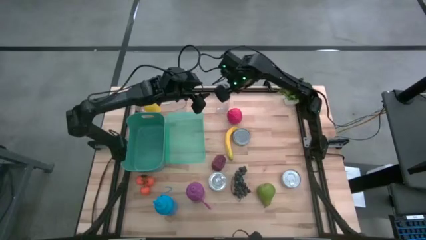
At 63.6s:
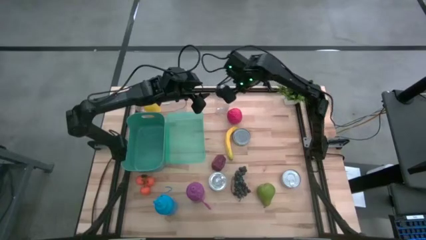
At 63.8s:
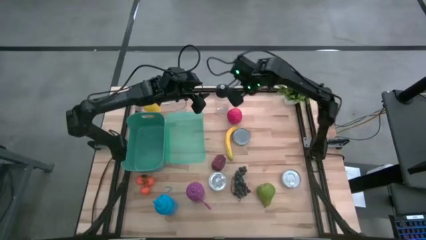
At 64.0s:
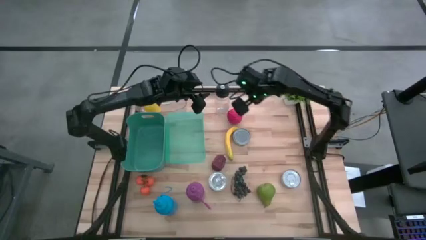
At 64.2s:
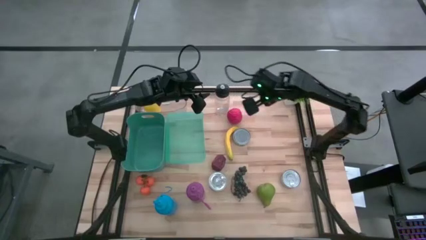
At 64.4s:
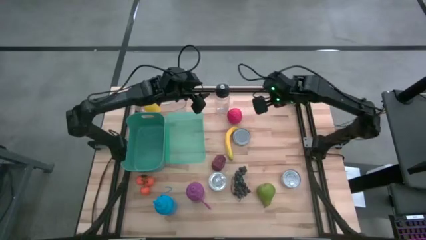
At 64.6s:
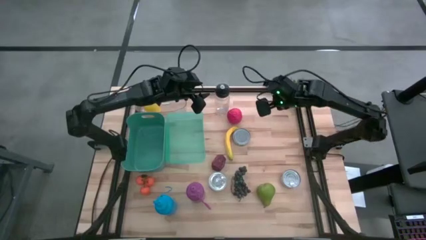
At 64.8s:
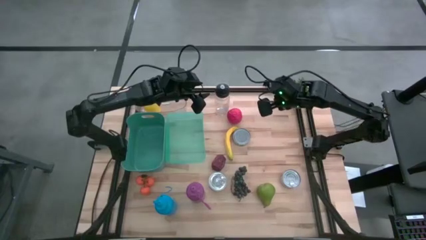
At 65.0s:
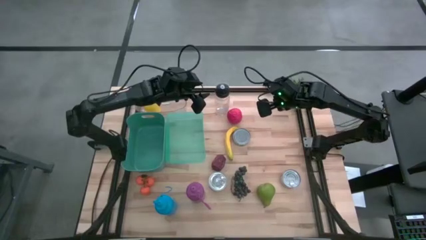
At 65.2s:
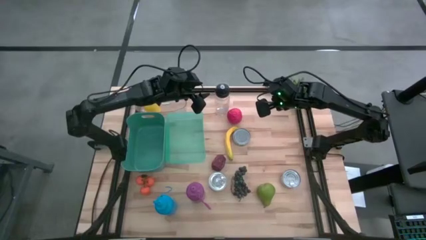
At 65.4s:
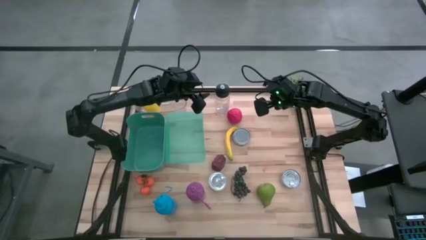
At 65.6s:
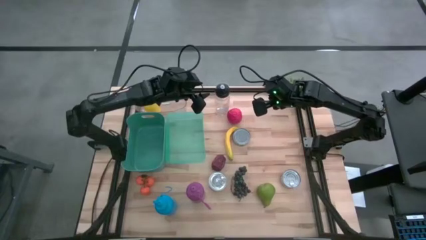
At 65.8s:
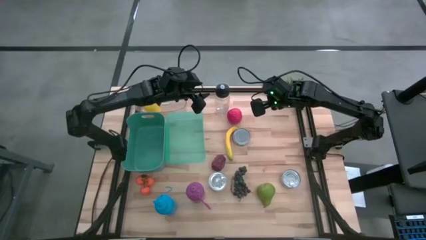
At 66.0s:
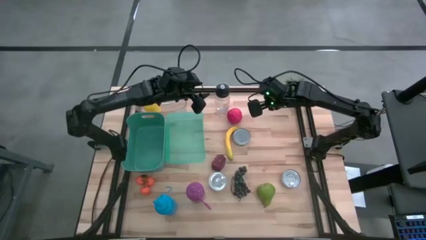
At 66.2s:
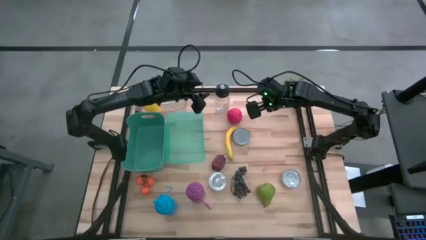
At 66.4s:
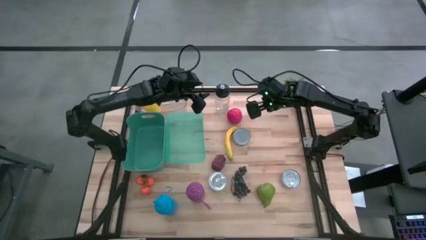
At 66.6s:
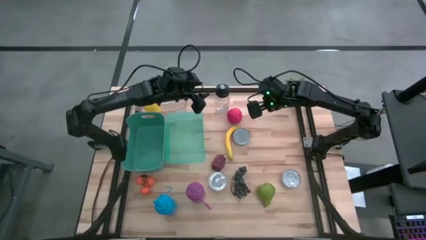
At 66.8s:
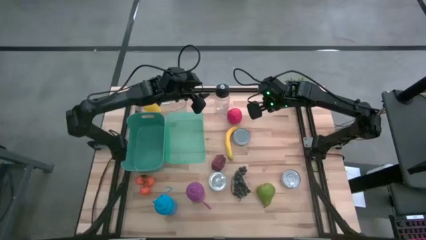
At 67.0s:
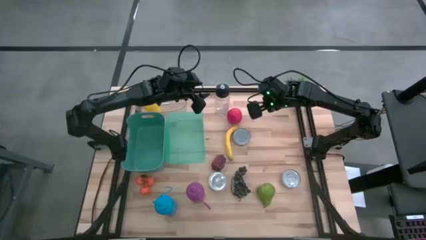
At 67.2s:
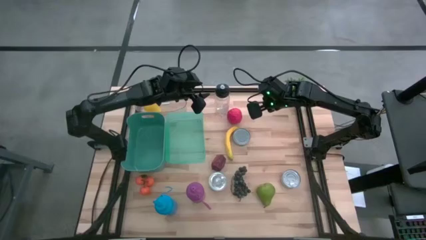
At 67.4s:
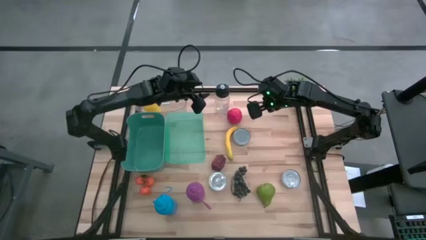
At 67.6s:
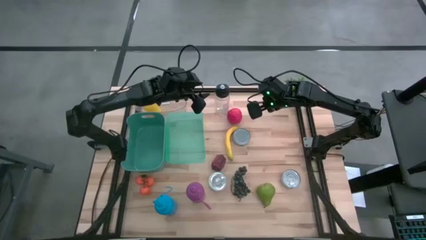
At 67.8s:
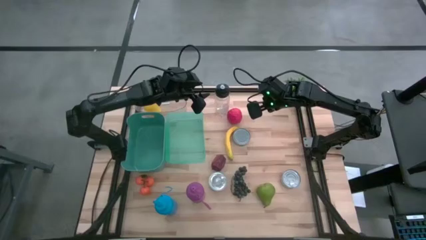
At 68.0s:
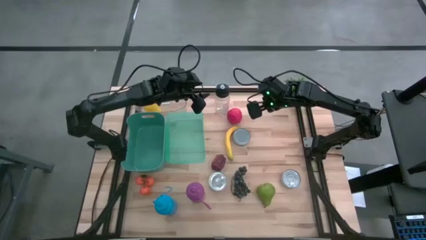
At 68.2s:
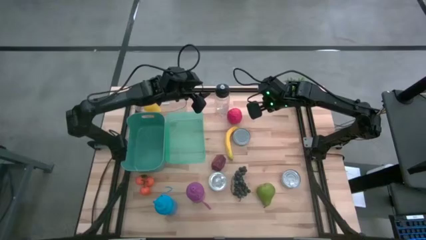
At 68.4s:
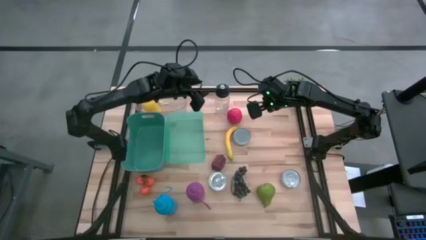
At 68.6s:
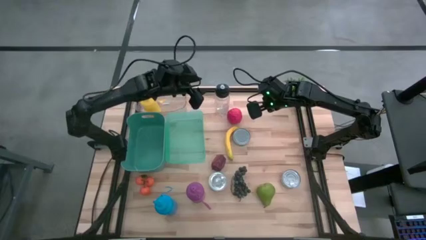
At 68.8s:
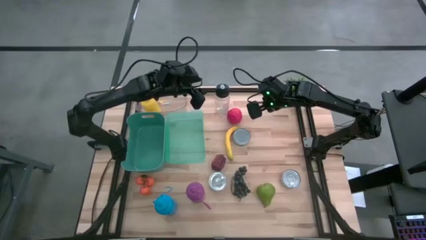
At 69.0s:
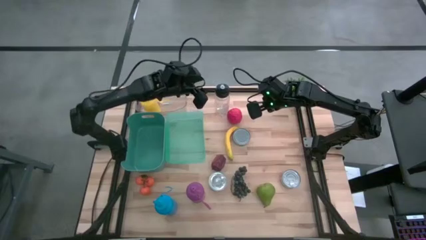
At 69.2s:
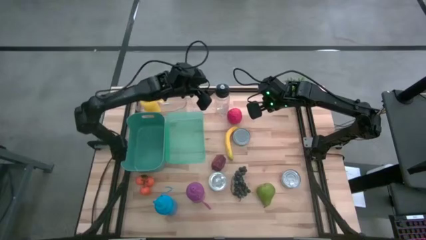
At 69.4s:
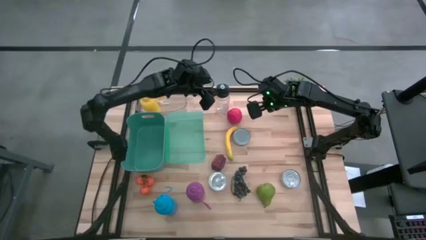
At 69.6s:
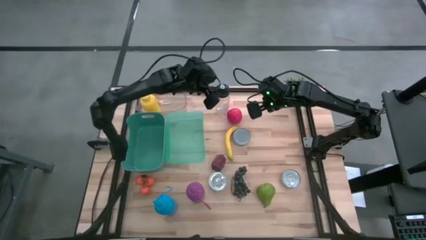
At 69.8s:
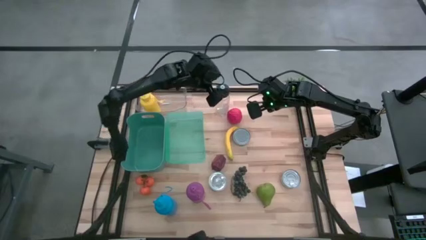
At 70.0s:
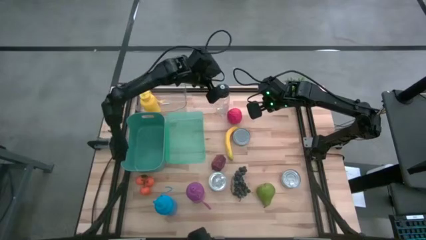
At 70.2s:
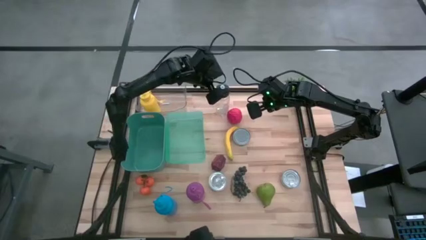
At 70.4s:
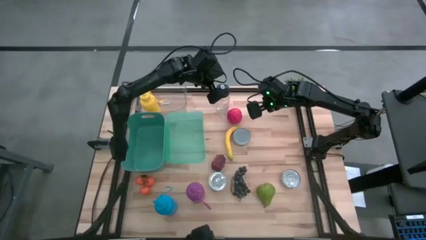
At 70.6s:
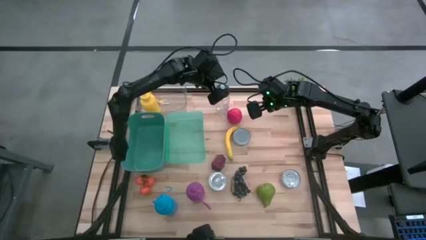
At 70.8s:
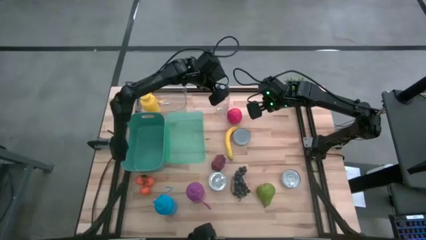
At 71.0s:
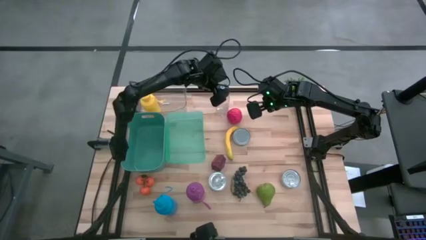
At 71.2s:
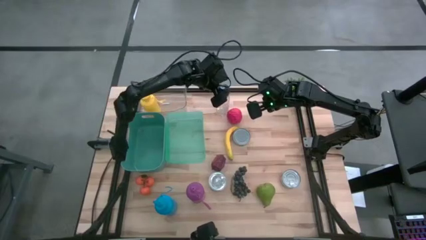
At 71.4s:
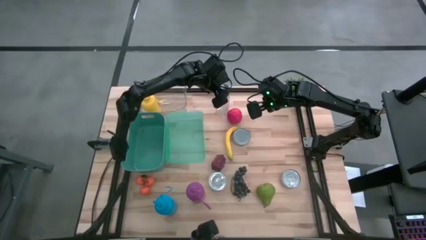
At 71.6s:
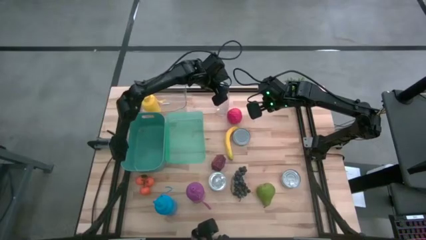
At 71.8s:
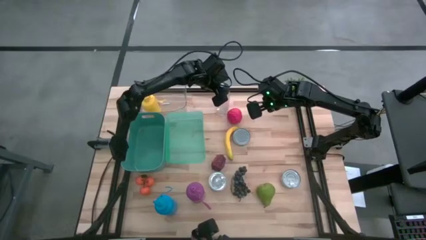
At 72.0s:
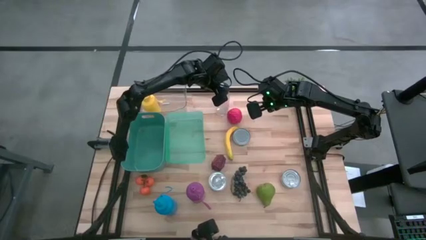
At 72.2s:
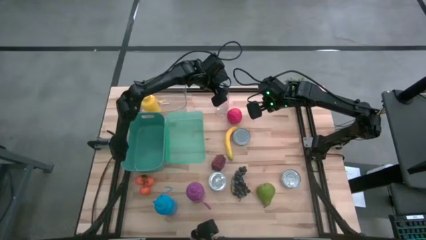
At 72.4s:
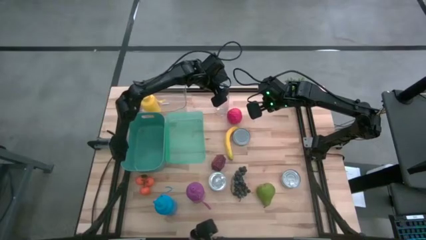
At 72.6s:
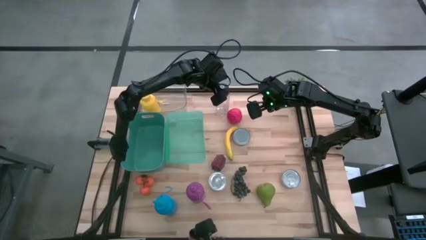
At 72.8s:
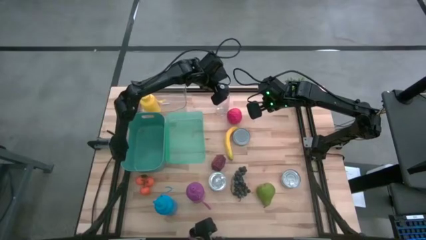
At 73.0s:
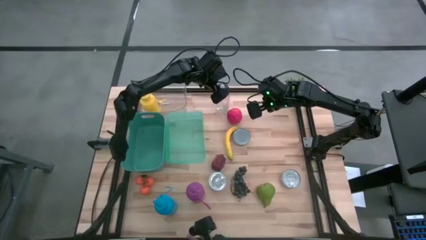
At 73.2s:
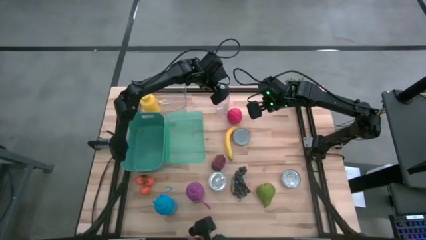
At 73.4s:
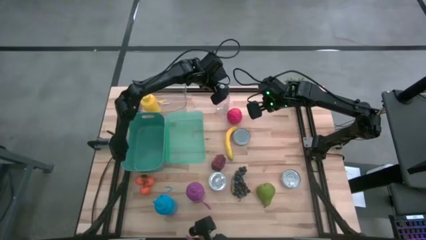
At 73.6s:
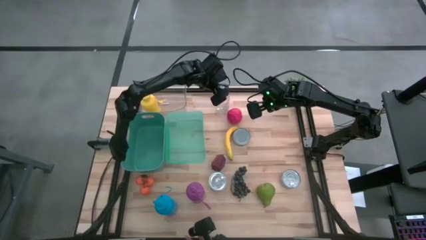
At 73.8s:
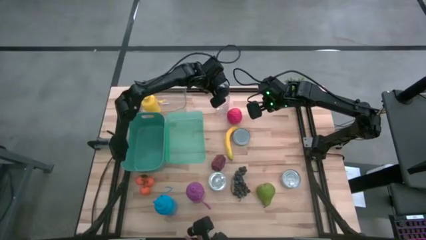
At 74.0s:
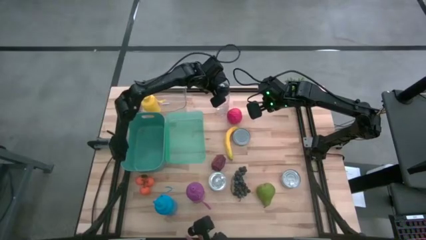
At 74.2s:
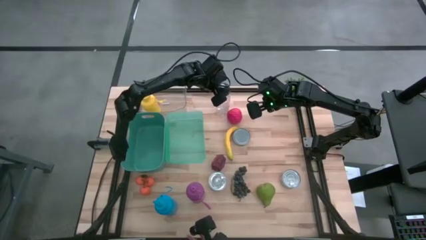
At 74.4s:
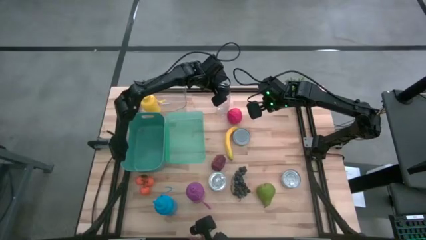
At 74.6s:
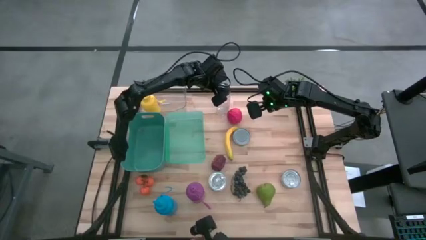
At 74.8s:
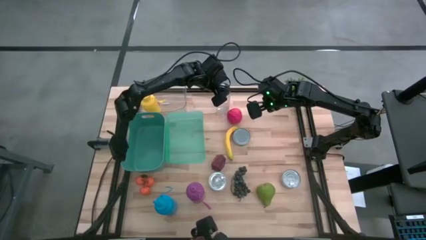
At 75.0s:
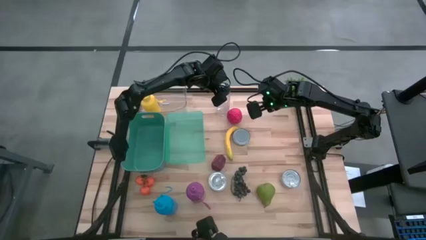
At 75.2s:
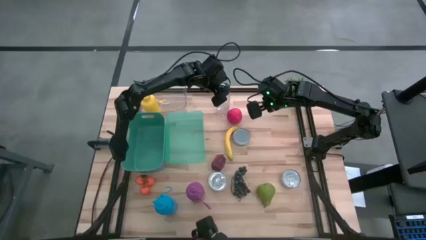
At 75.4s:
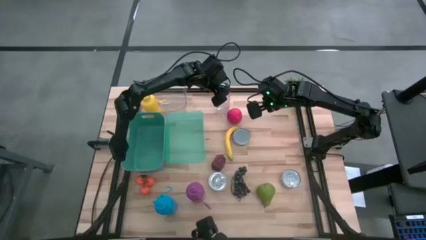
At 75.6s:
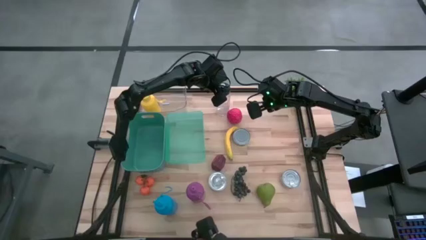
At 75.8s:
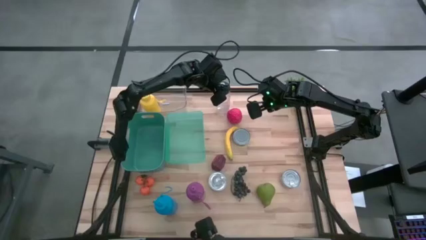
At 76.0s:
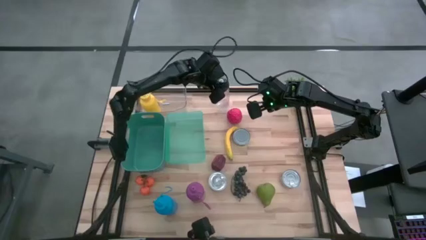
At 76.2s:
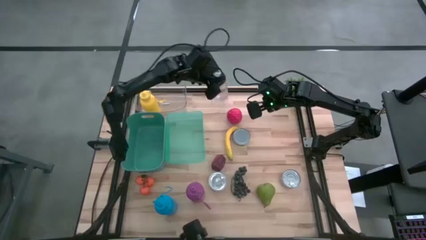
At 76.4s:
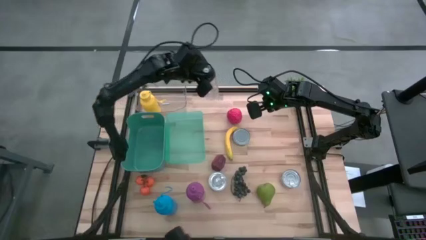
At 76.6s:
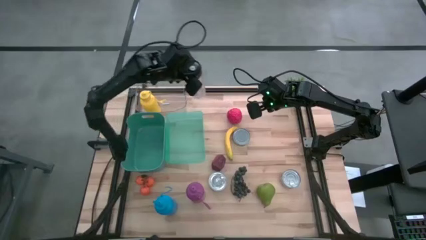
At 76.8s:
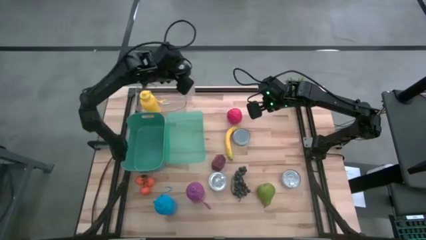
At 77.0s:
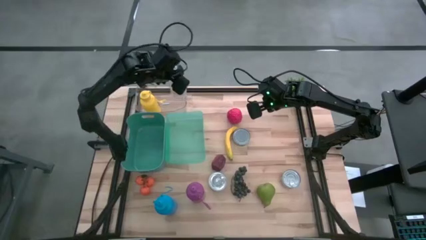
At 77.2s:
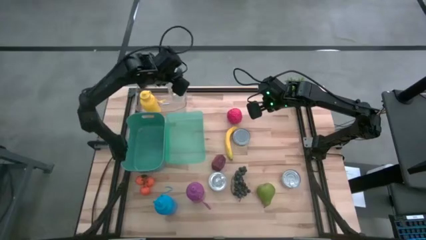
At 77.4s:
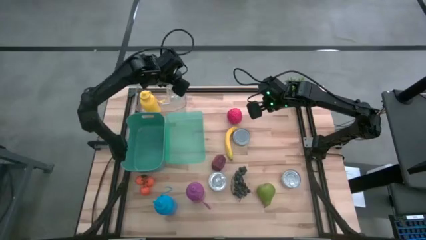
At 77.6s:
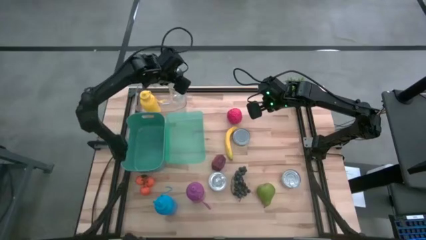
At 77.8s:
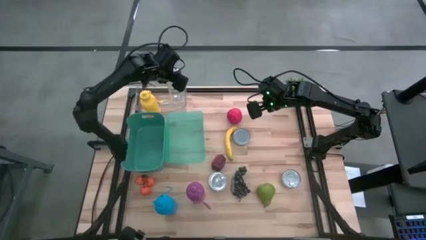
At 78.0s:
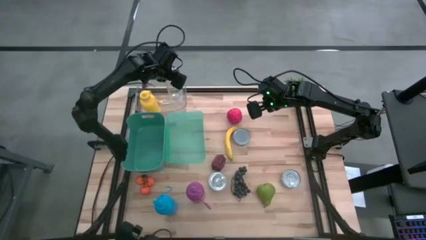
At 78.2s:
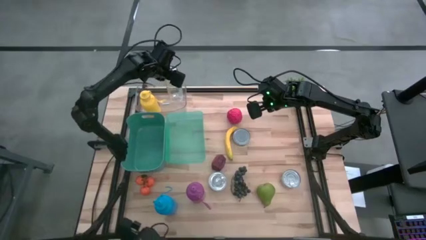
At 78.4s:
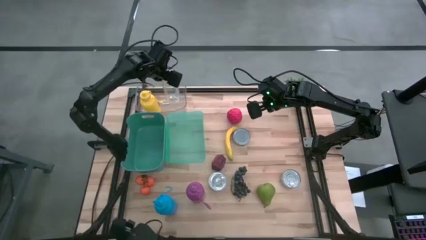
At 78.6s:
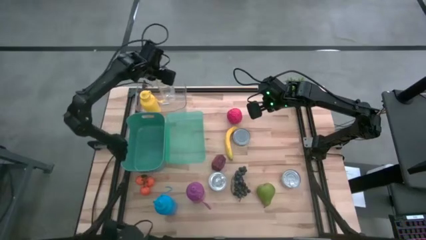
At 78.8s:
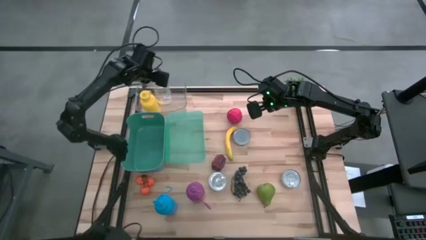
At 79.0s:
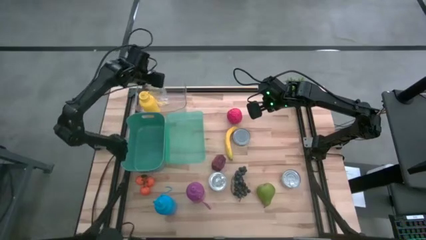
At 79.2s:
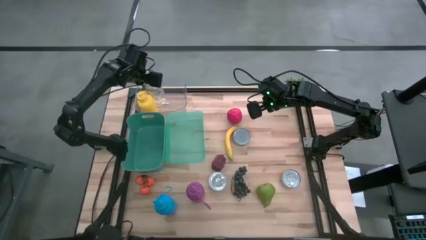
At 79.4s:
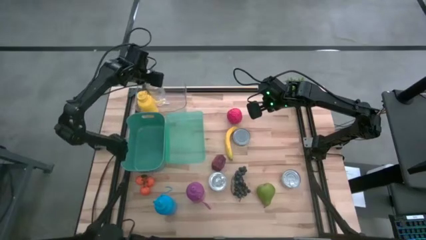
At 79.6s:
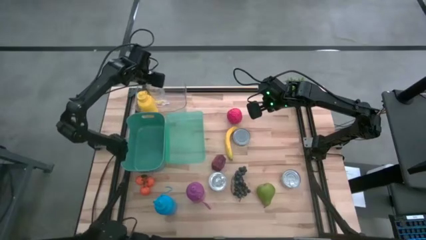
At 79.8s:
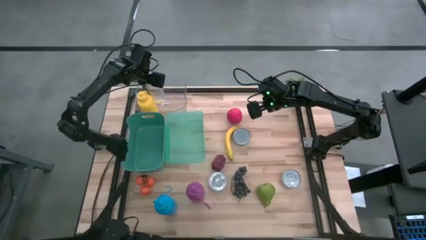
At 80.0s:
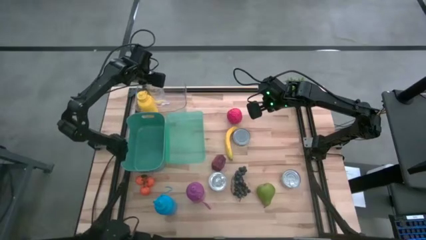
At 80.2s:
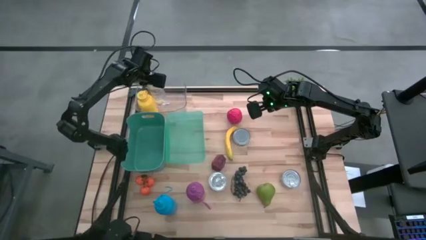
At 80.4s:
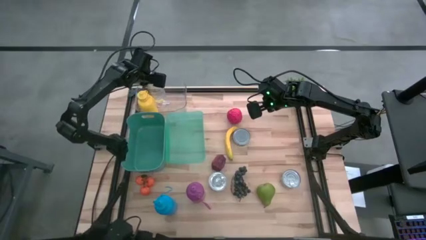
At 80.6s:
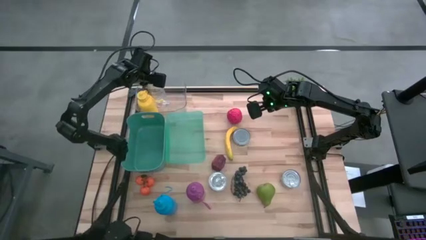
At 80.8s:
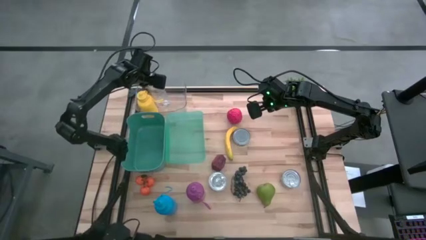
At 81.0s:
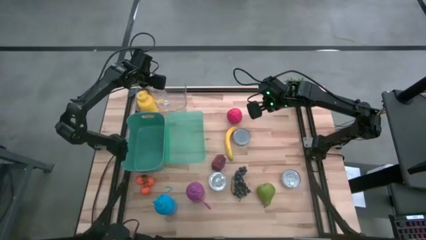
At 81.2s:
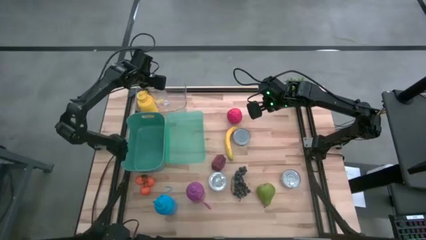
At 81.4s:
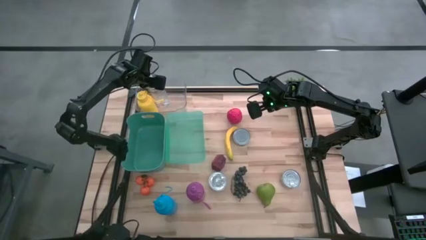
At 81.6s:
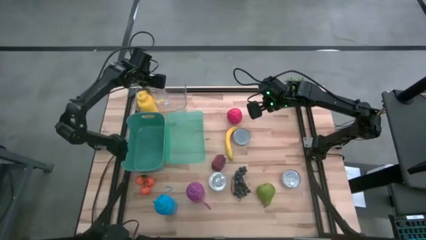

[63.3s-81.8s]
Task: Pick & Place Food Item
Put the transparent water bottle into the transparent bin
